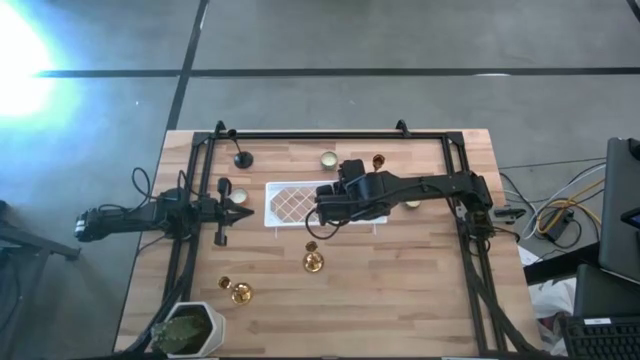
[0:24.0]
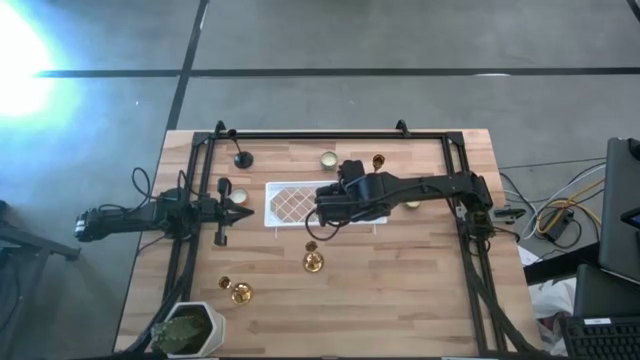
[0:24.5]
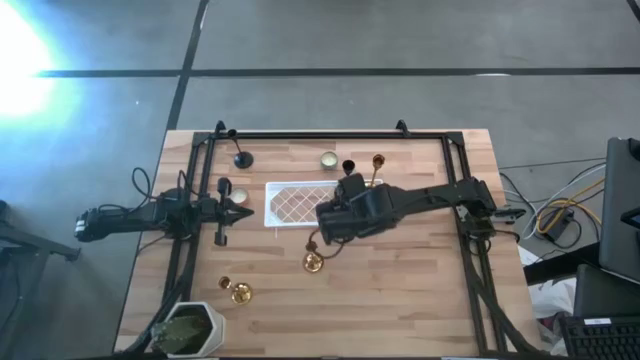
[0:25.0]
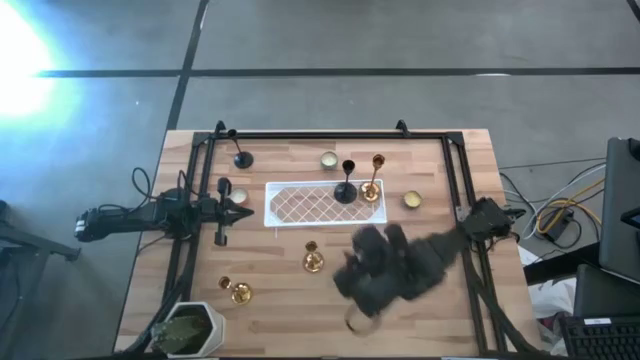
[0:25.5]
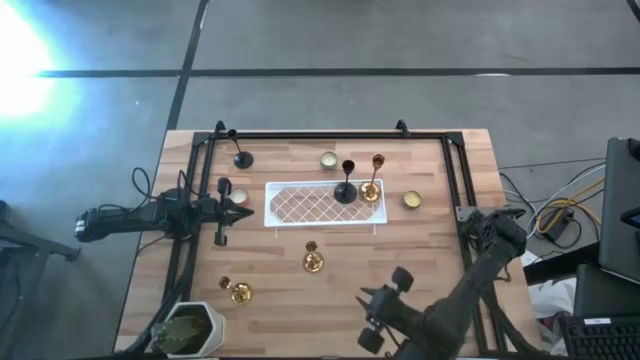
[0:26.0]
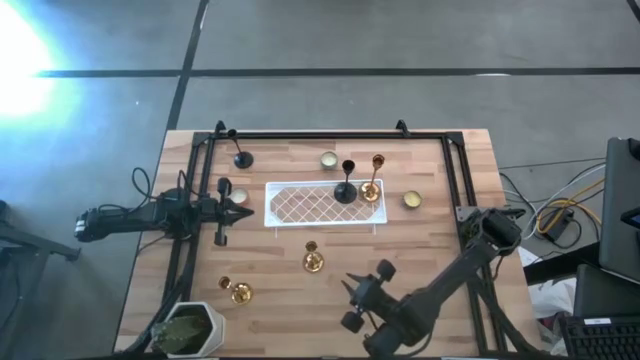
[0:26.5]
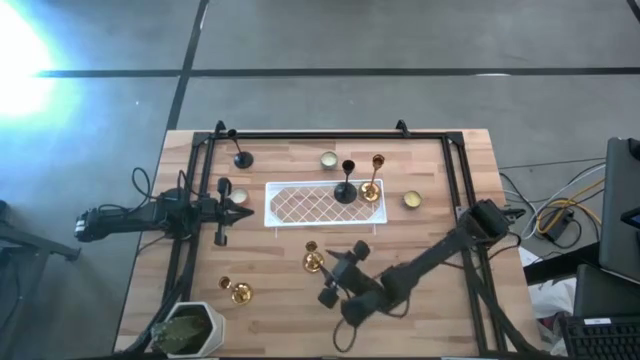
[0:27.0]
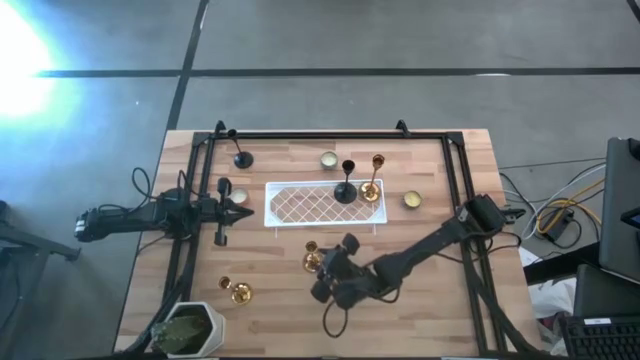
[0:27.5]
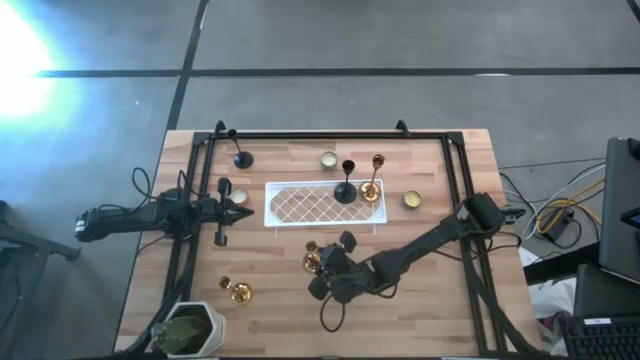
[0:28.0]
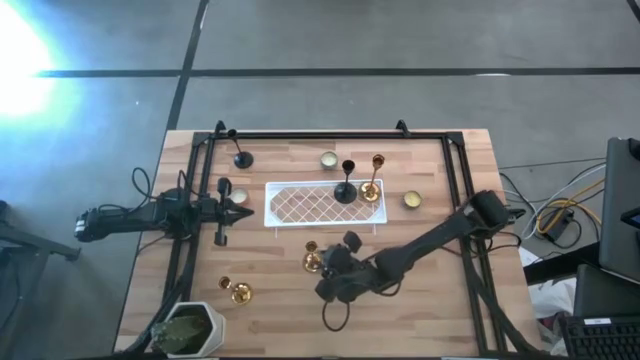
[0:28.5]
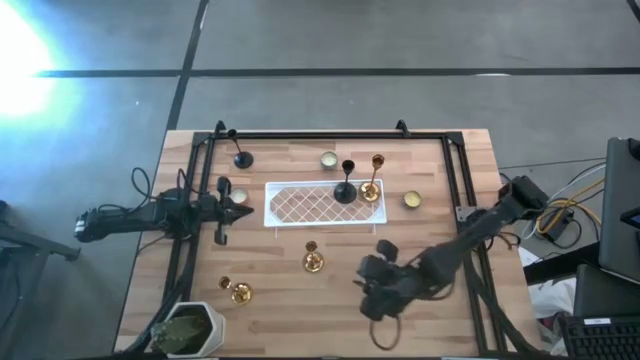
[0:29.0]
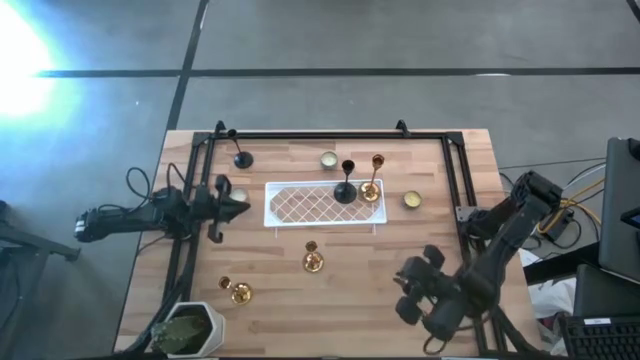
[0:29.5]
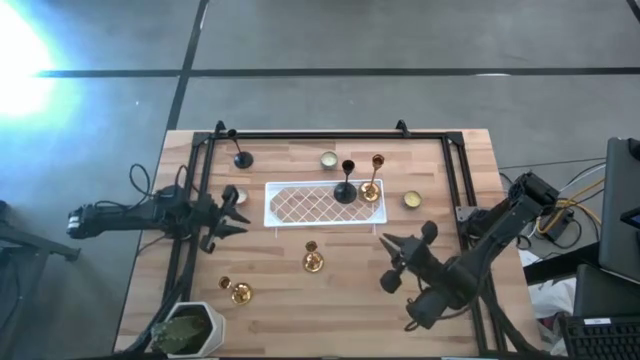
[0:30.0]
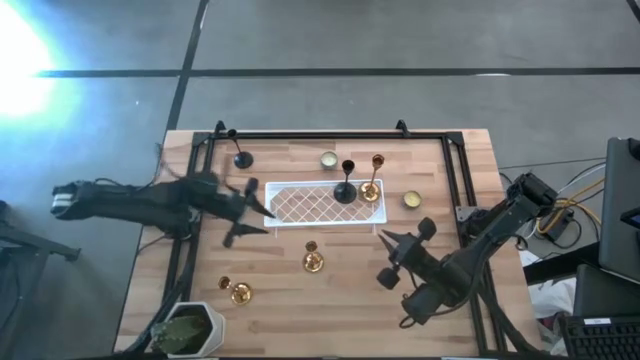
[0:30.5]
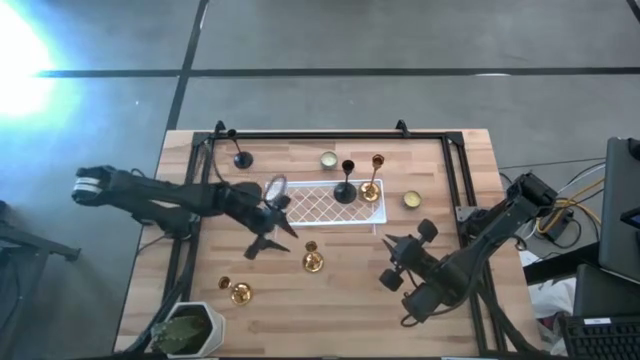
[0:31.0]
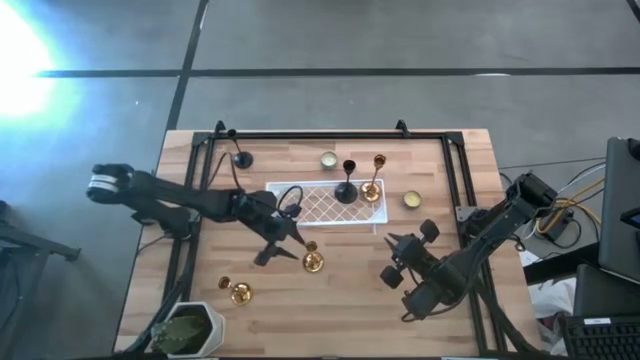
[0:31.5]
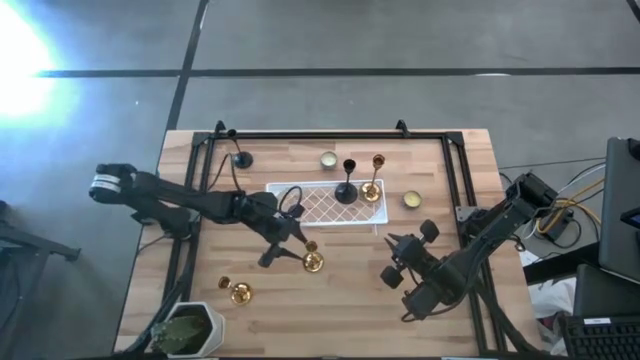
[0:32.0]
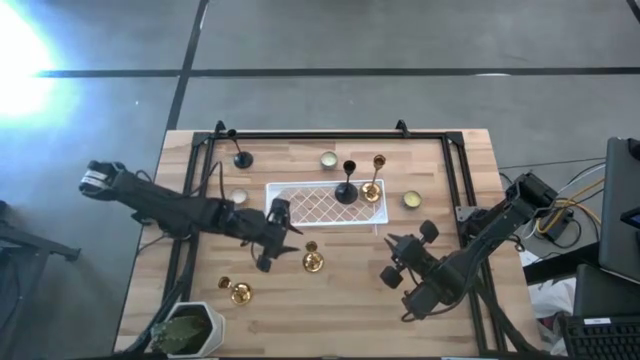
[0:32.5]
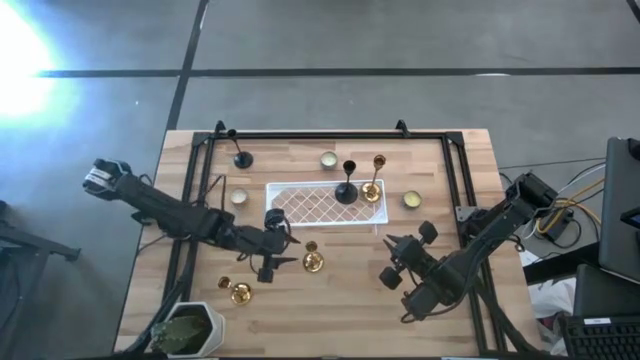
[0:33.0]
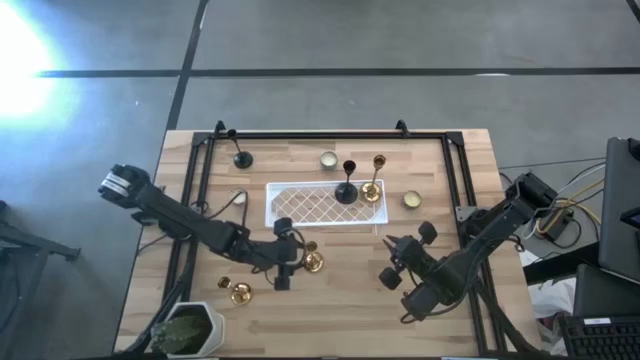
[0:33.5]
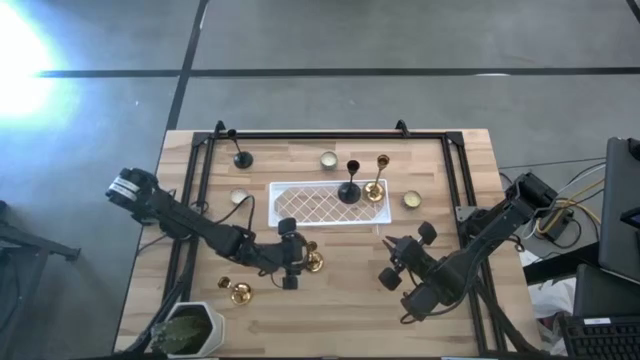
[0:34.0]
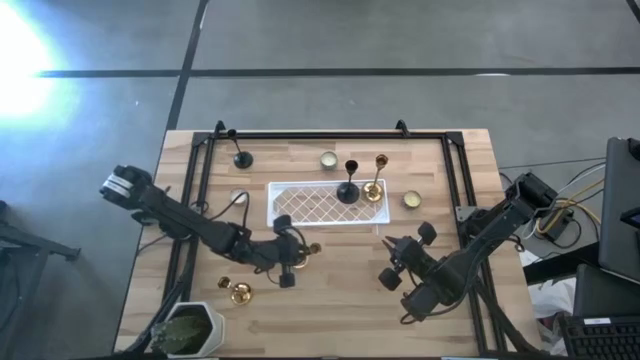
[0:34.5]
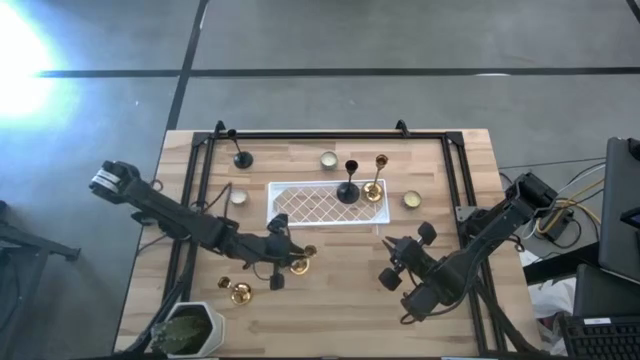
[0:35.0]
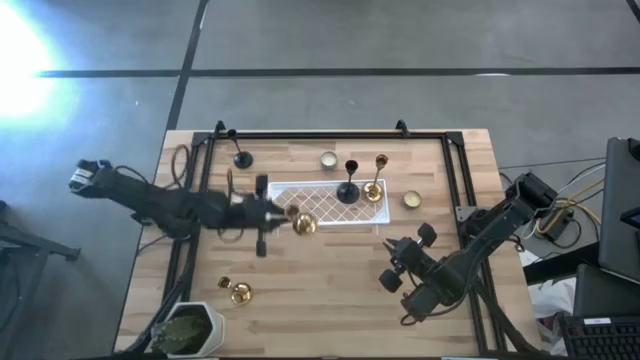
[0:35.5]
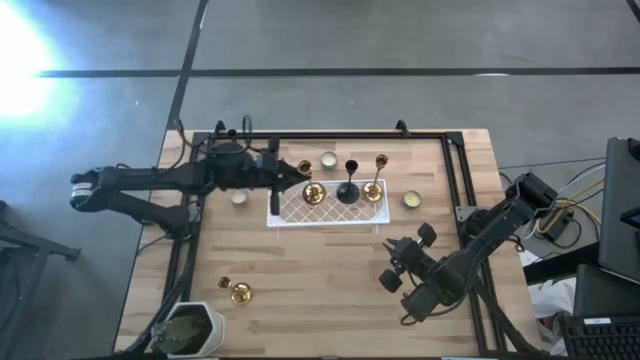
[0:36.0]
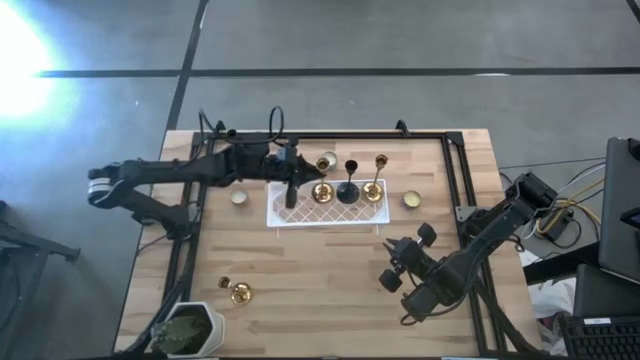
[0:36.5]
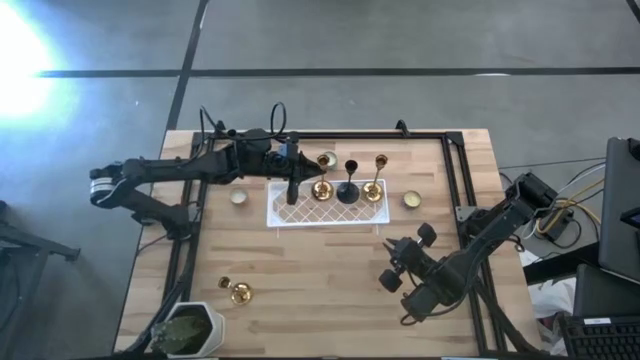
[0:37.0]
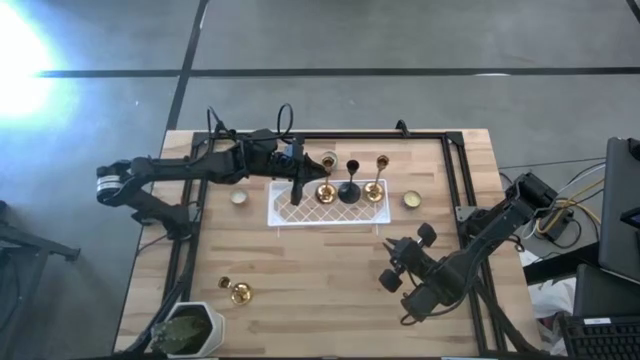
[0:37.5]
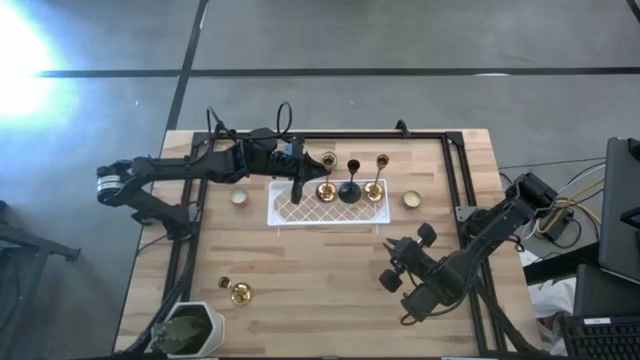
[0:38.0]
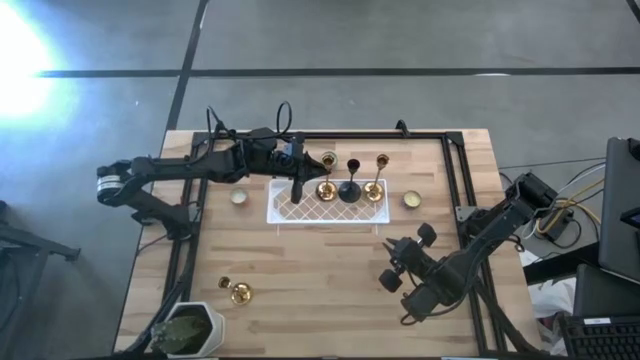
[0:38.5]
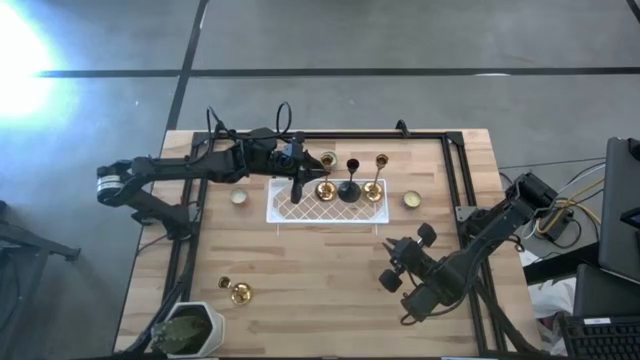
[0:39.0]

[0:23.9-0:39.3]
Task: Pick & Place candle stick holders
Put the right golden candle holder on the shelf

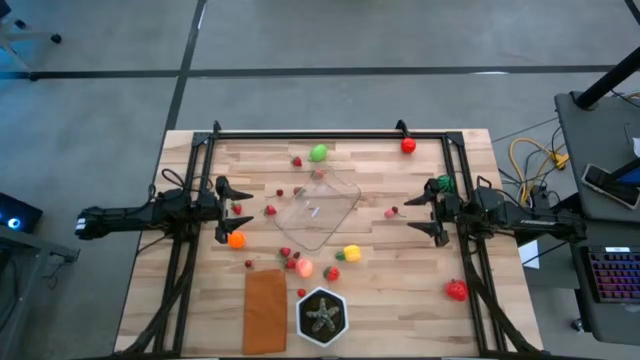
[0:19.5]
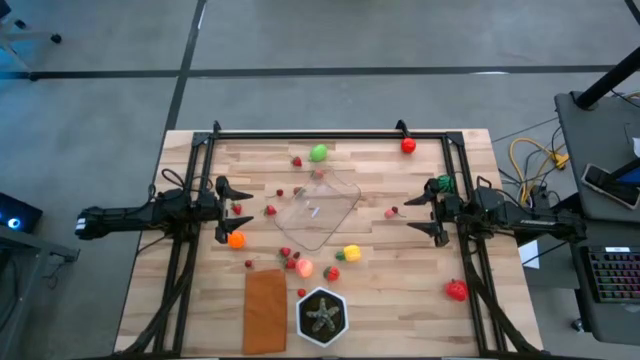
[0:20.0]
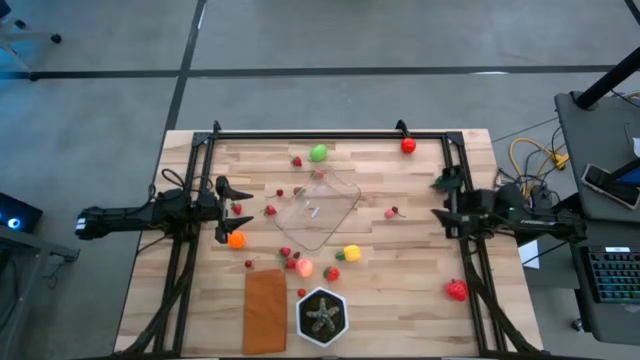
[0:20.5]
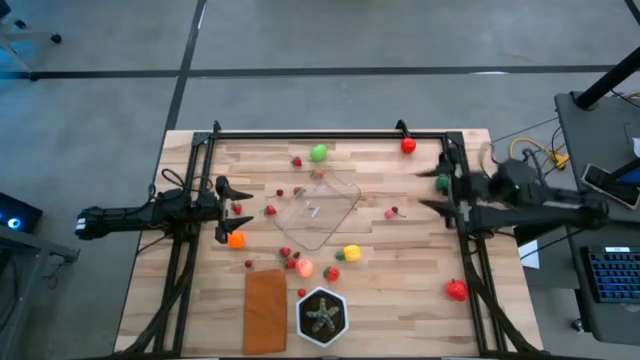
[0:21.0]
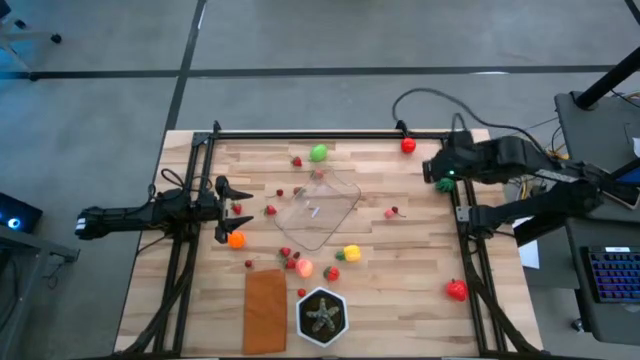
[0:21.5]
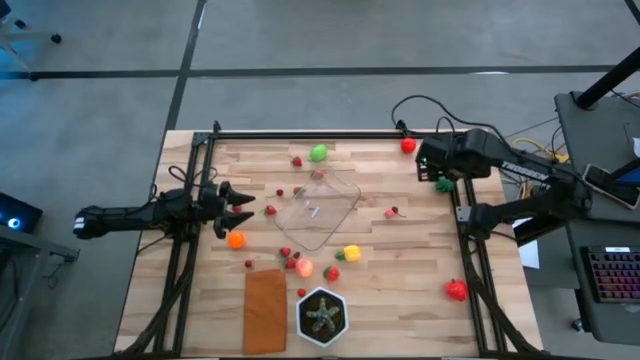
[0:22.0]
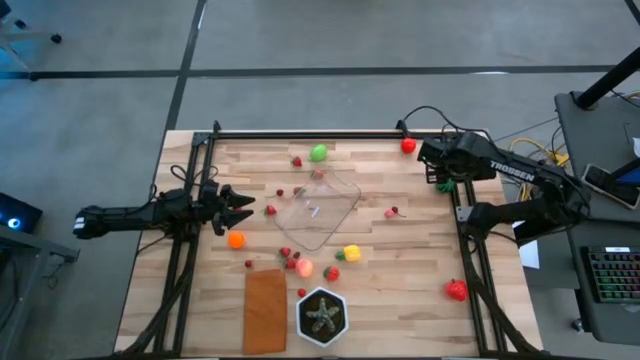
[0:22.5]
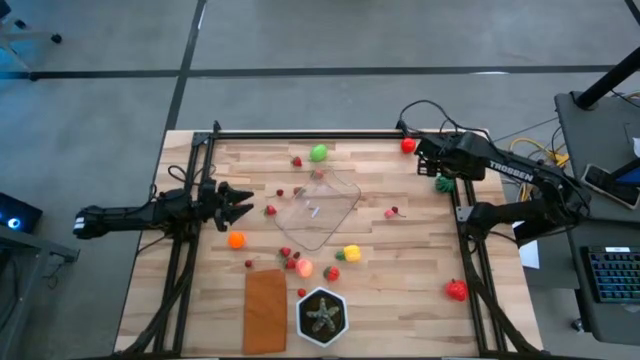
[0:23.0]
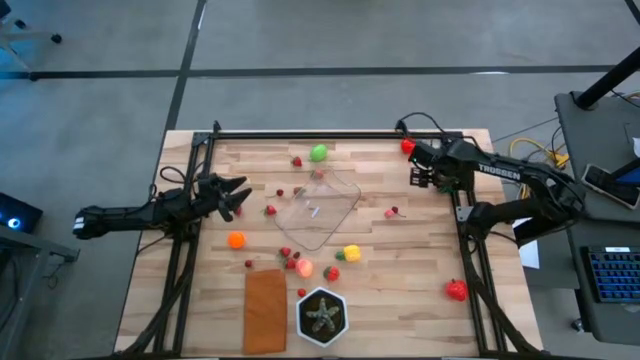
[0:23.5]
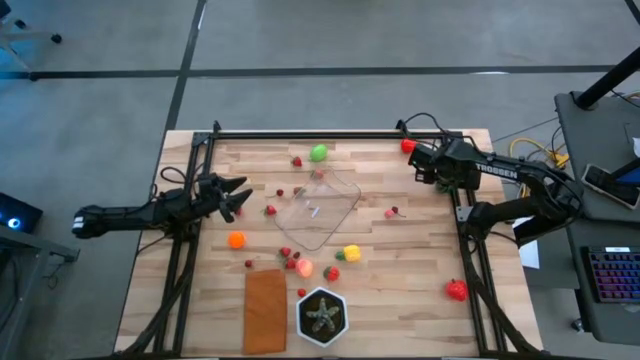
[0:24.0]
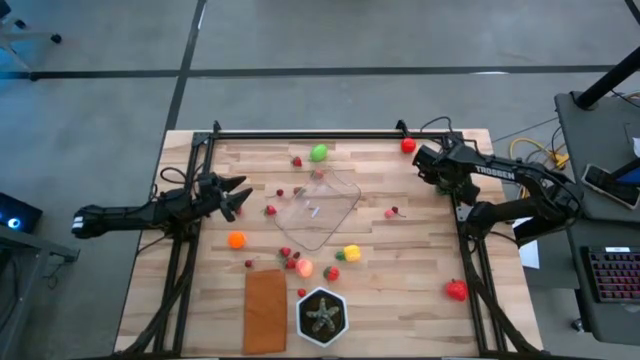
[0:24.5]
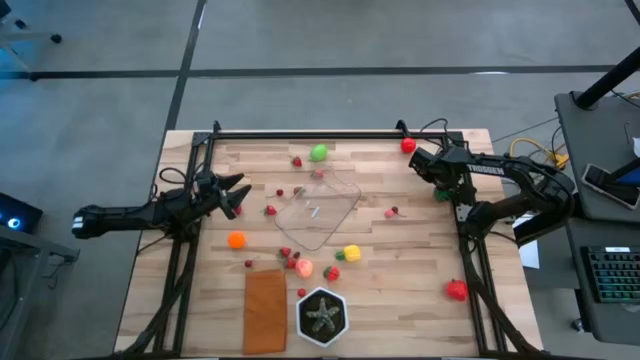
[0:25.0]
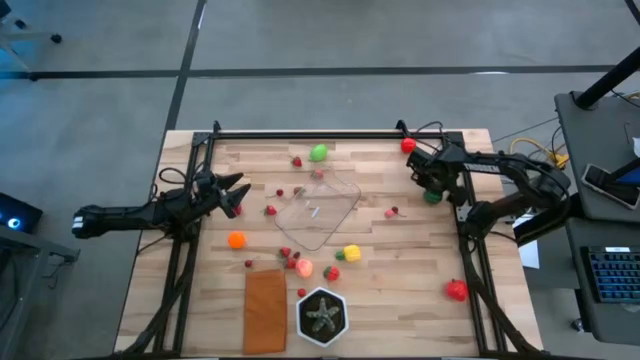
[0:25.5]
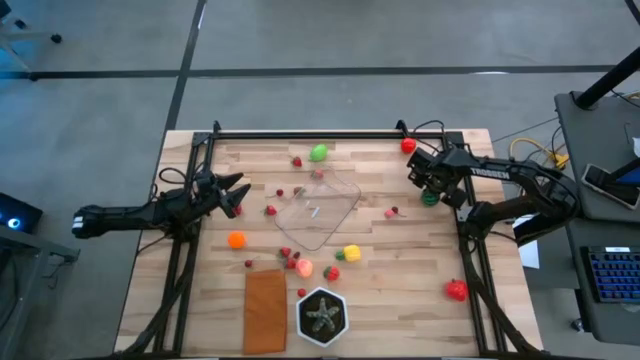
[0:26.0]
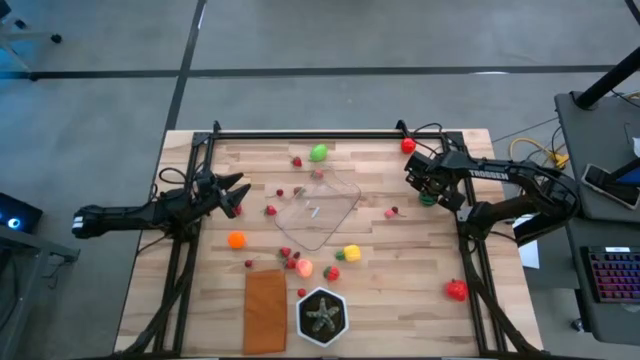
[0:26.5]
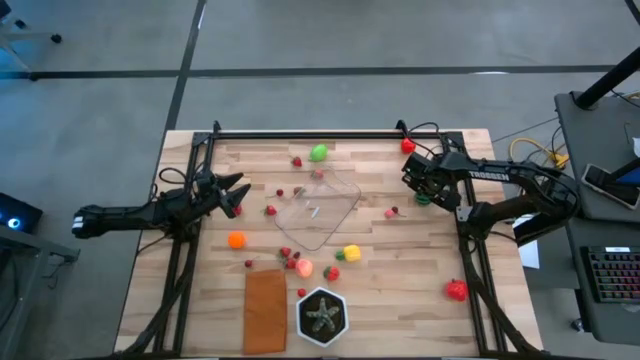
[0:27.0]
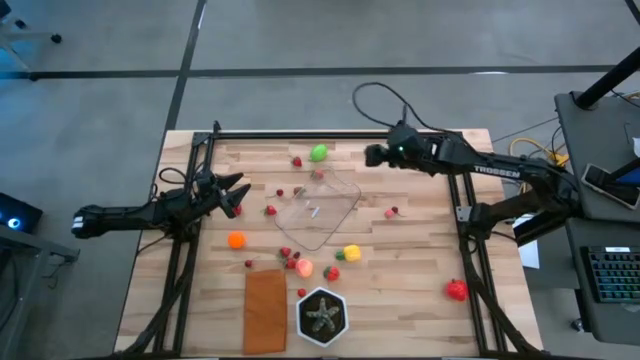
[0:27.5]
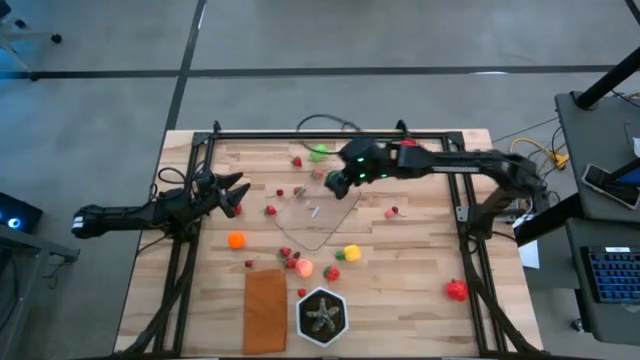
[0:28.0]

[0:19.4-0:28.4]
Task: Pick and placing Produce into tupperware
Put the green watermelon into the transparent bin
